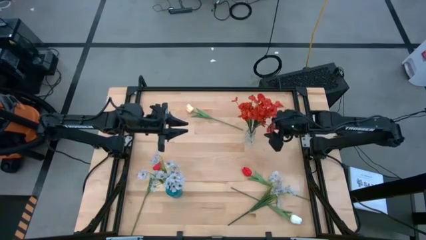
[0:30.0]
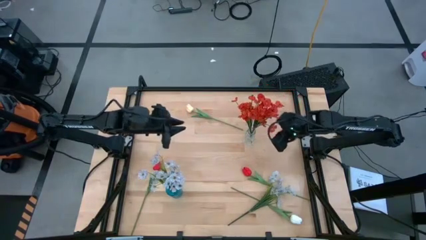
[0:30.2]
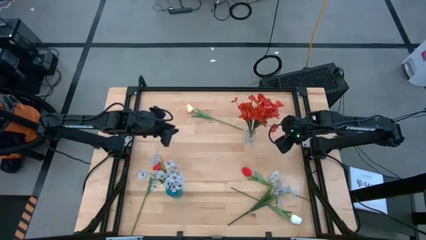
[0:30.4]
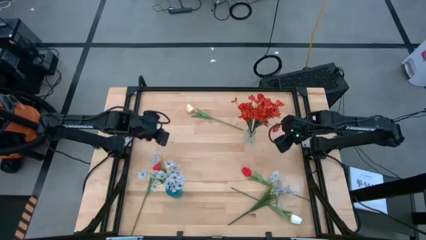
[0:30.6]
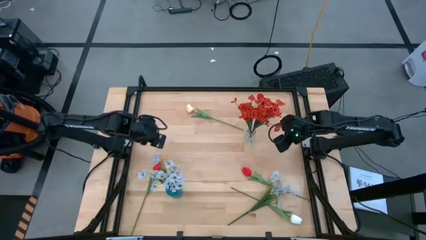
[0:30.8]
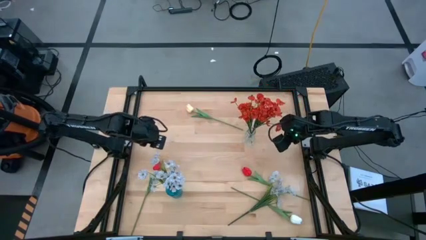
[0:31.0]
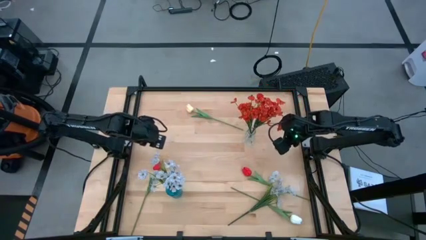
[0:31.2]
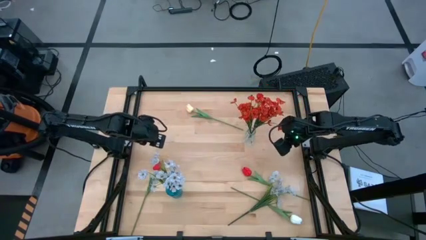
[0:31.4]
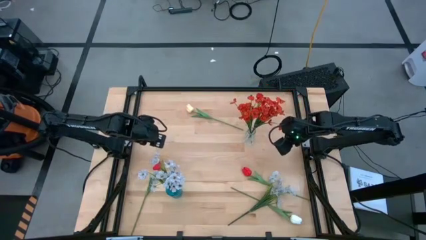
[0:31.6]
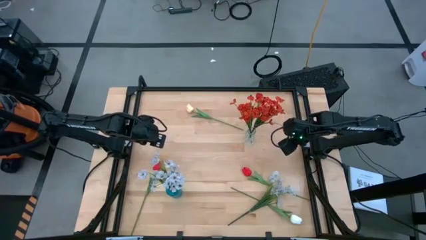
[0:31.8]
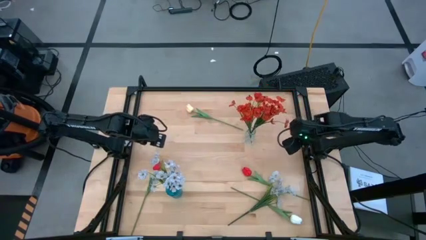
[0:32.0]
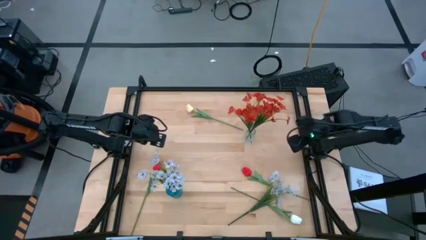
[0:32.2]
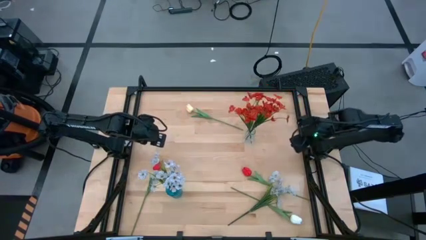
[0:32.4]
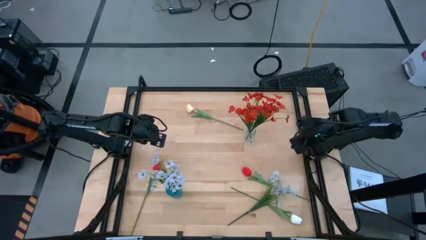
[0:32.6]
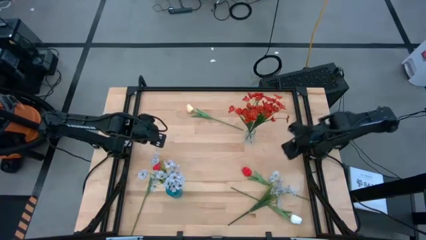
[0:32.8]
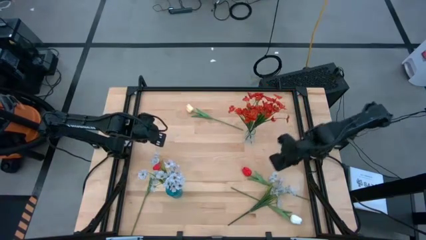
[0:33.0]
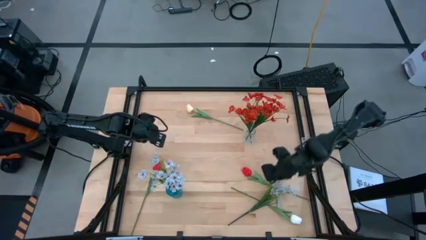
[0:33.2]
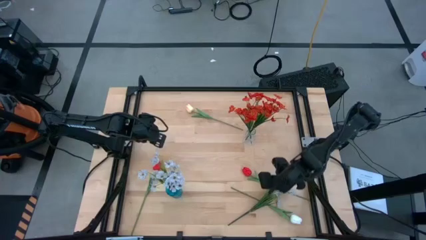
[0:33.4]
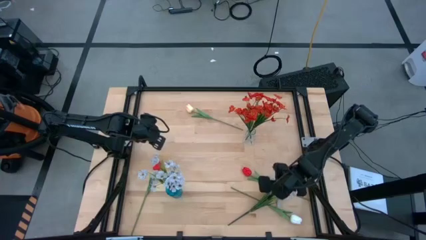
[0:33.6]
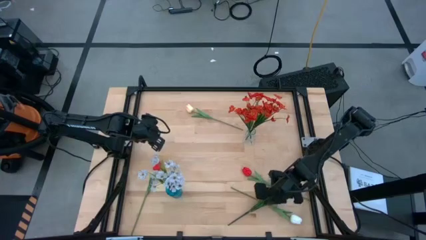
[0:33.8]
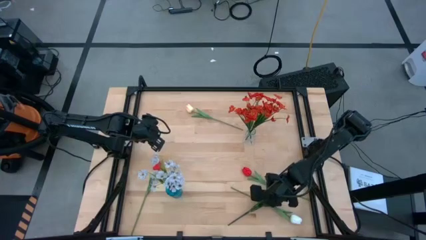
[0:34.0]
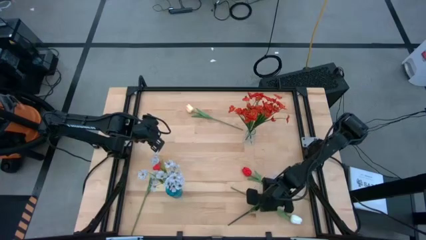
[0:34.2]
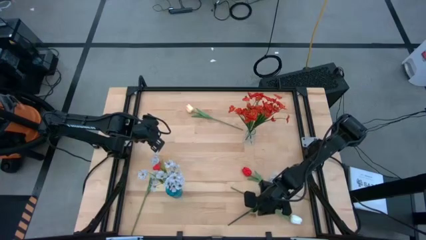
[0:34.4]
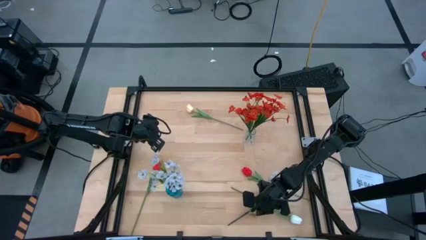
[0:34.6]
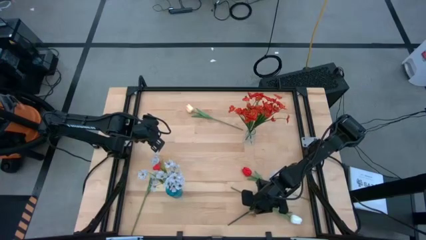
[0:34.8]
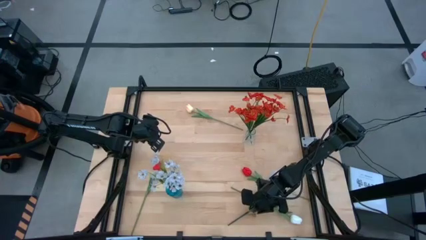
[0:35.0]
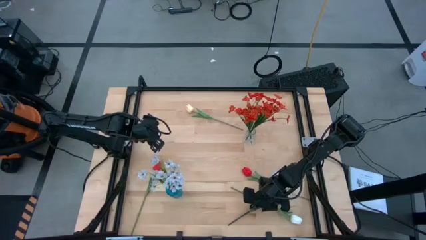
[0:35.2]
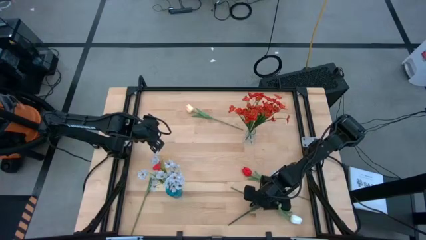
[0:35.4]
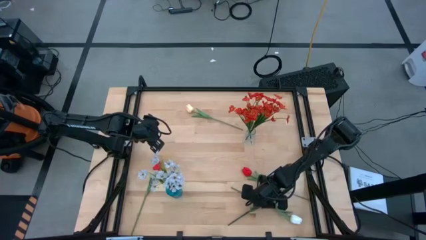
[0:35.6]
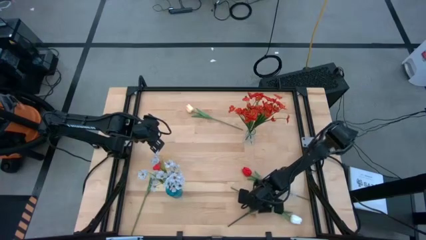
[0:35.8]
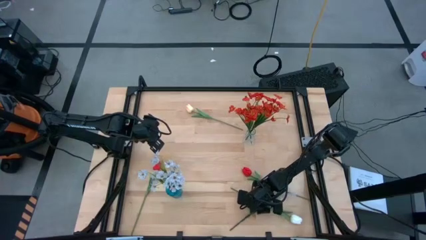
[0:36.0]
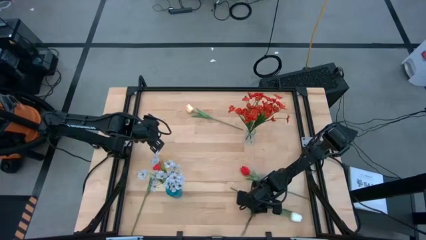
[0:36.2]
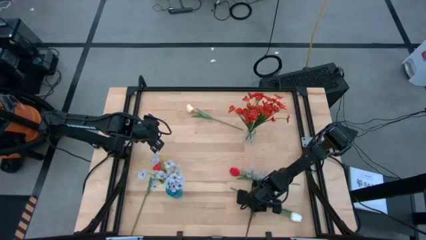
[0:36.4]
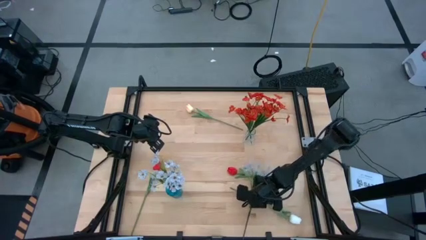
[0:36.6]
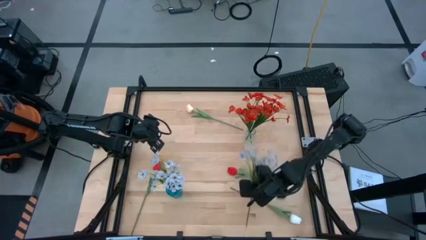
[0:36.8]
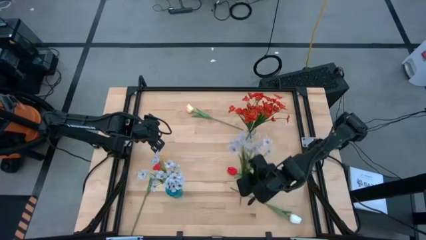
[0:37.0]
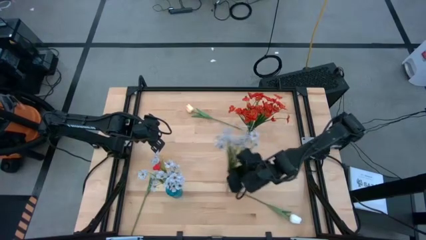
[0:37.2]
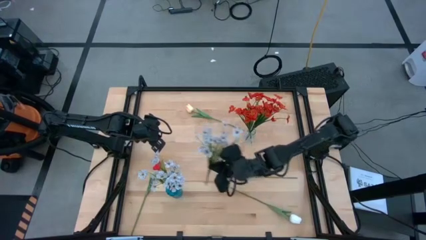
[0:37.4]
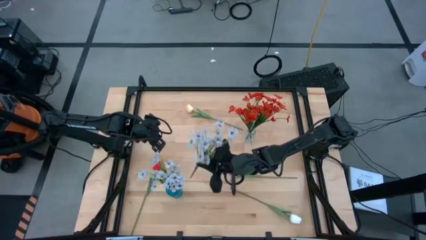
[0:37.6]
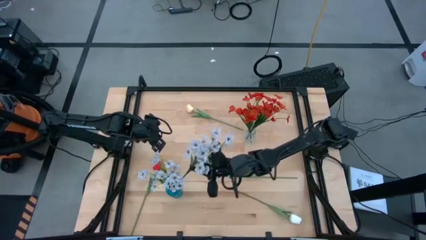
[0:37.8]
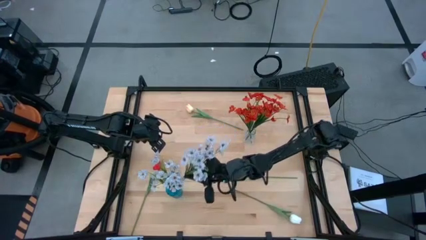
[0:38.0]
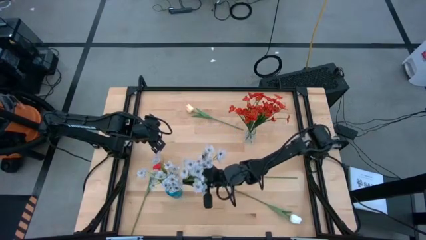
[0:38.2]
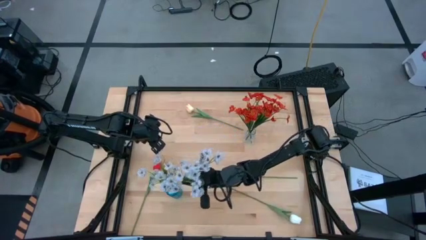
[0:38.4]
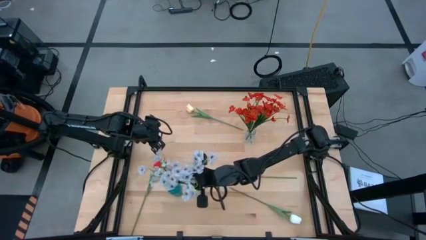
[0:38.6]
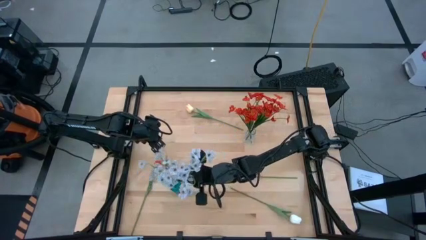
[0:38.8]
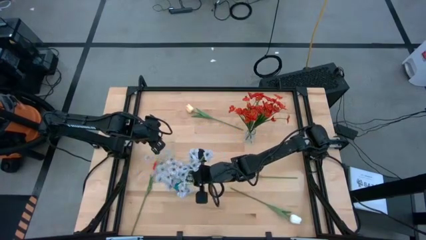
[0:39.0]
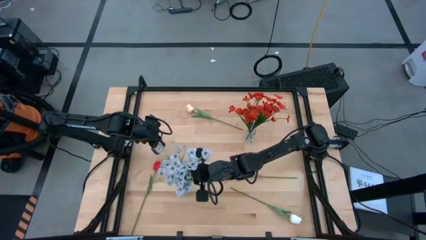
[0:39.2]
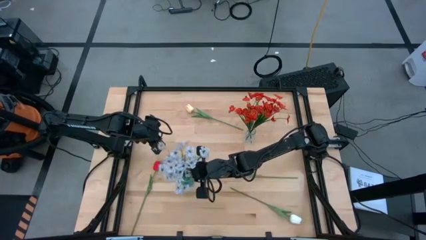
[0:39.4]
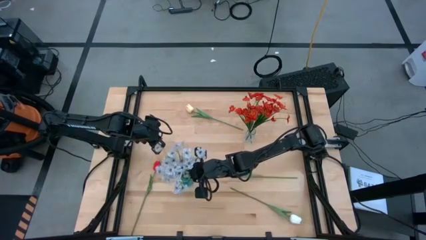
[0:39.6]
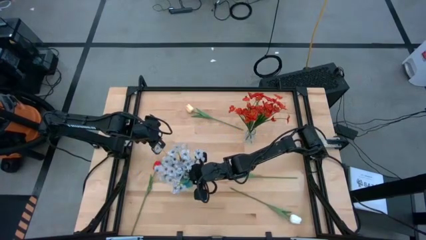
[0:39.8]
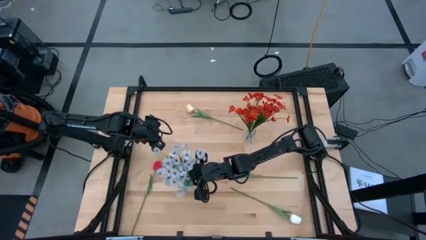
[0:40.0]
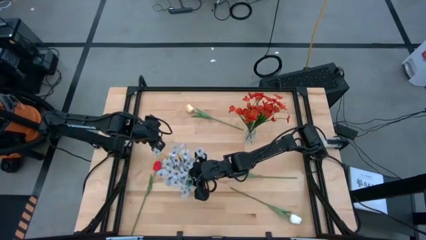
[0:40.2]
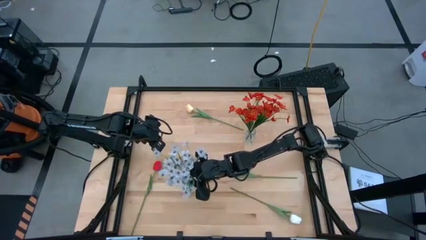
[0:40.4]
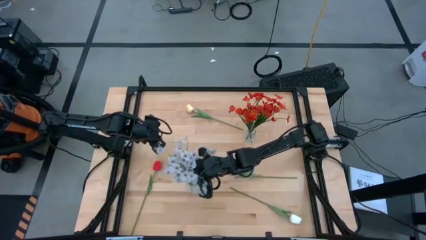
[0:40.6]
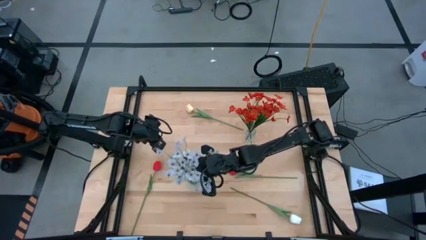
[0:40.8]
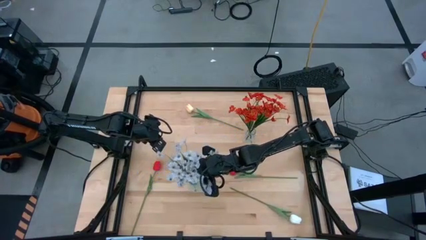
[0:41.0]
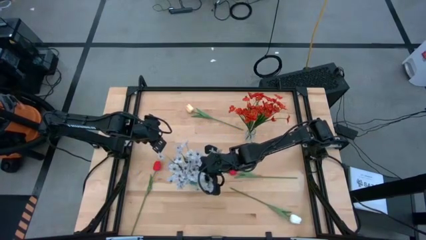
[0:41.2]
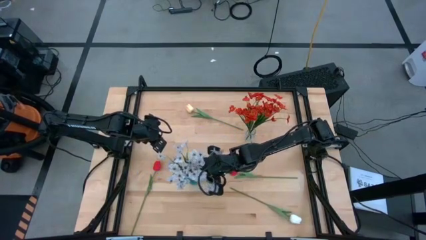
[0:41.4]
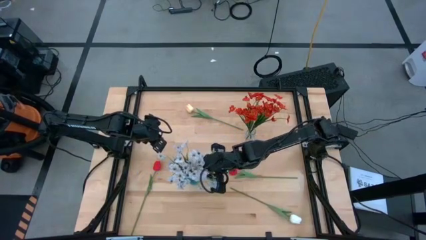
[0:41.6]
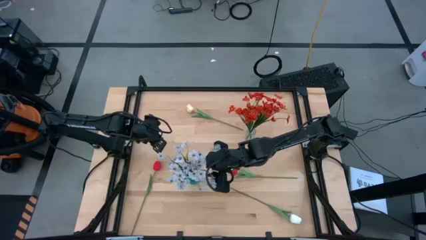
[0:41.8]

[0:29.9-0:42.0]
Task: Sort flowers into vase by color
Put the white flowers into the blue vase

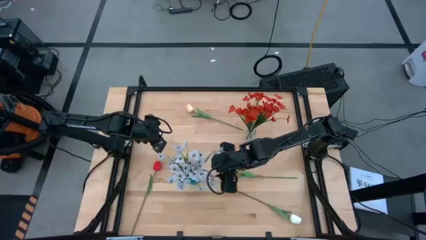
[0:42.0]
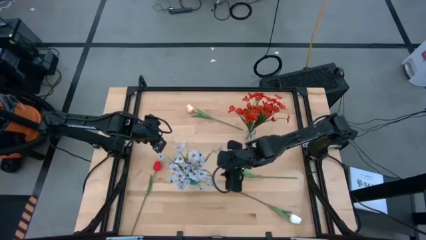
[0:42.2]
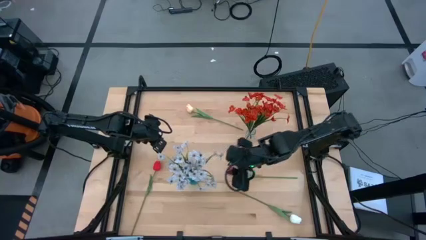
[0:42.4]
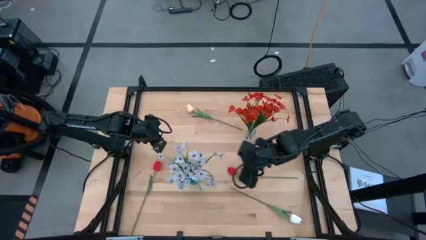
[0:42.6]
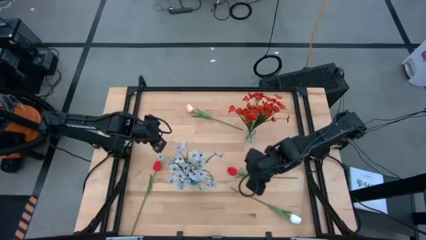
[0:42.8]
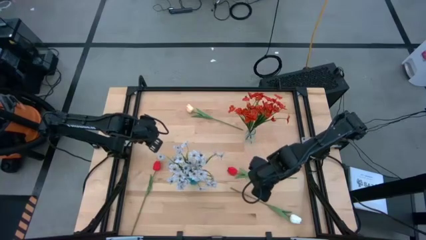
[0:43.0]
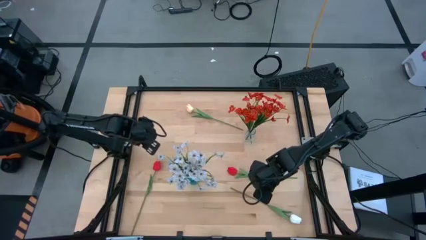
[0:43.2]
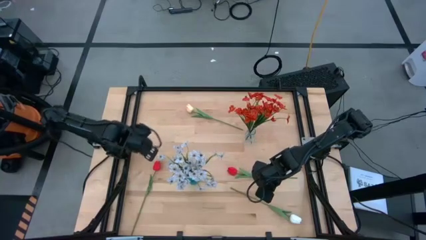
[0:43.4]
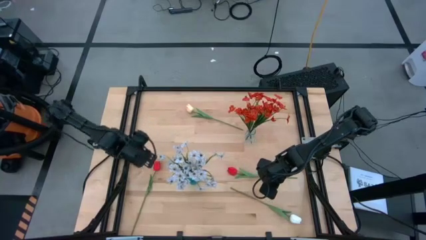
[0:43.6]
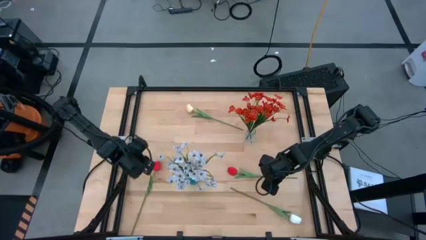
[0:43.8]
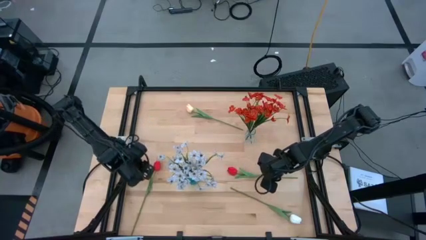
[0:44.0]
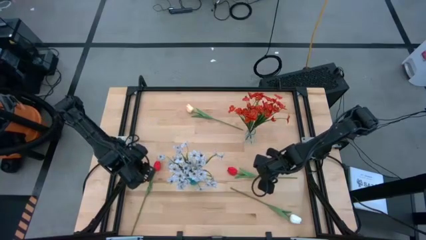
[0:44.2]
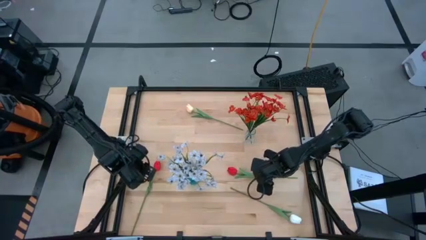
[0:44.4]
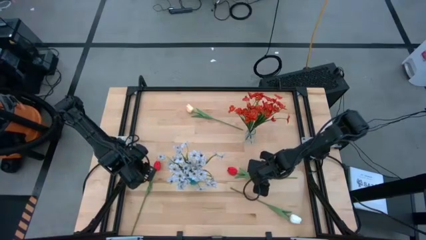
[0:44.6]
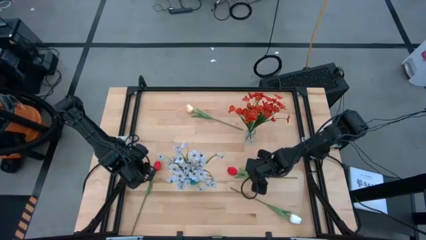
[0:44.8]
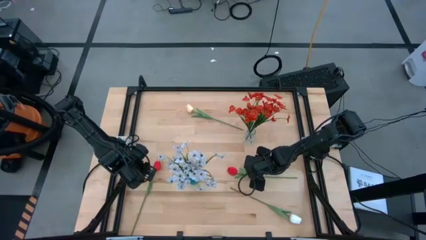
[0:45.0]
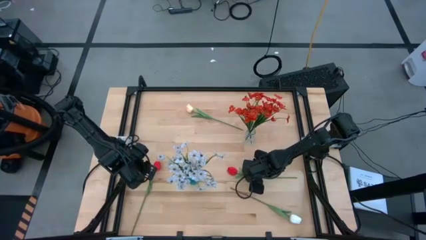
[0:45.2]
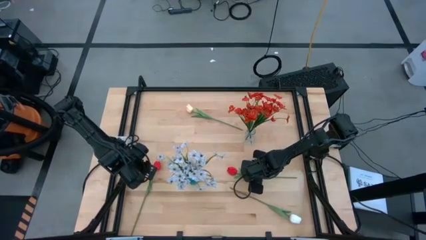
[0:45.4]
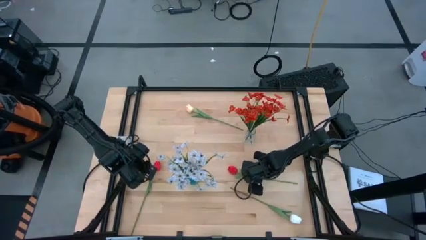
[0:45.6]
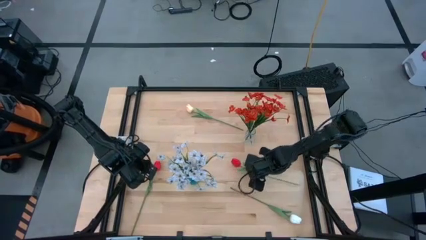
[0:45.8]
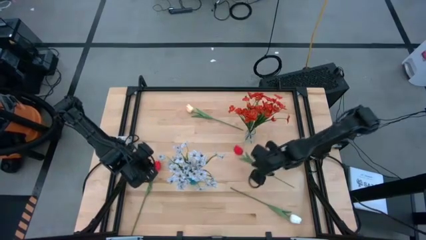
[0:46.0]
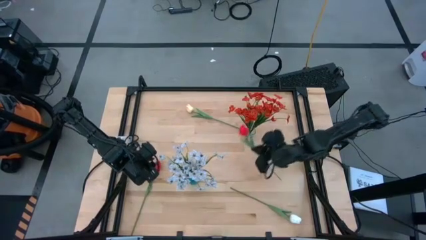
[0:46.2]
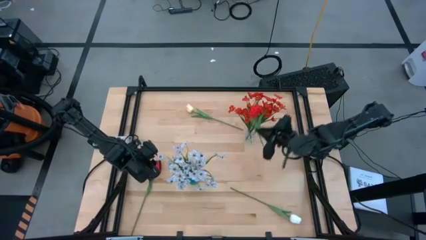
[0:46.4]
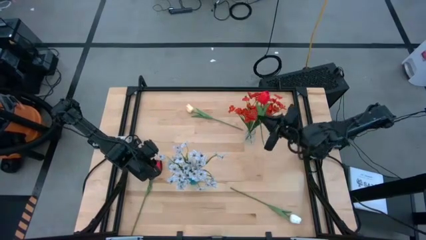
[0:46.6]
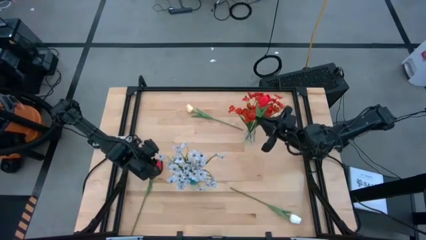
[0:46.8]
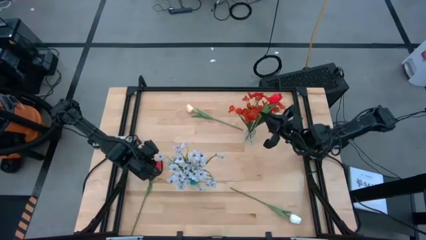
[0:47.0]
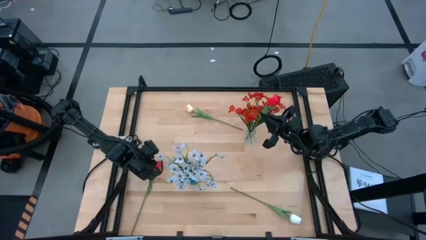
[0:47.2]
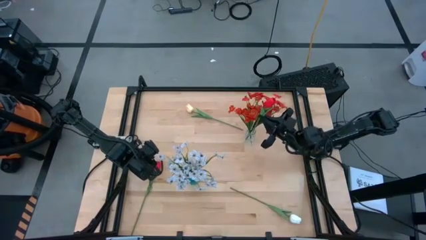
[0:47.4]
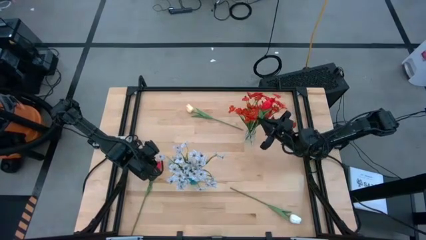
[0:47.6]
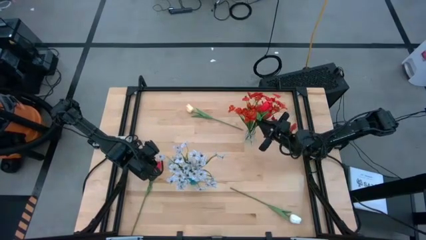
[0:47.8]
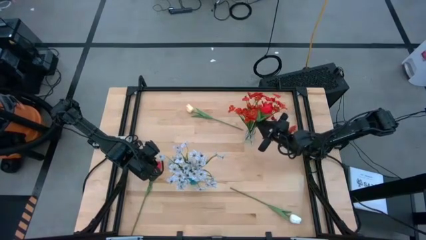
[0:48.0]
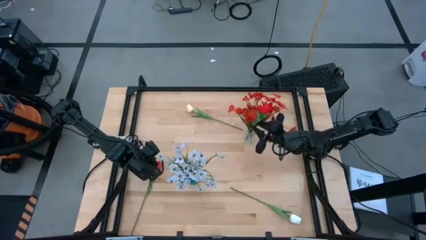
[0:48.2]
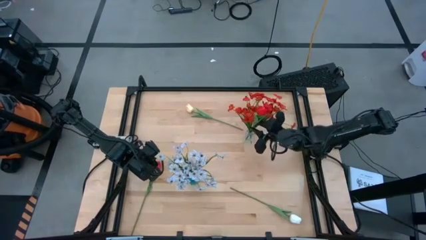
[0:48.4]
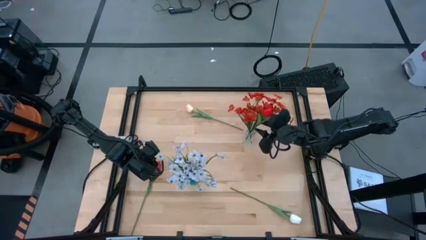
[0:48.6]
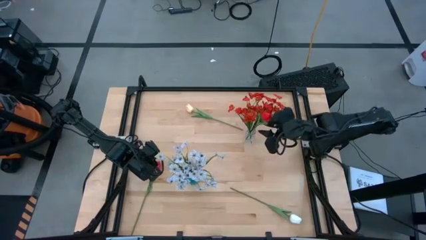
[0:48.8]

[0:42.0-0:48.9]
Put the right red flower into the transparent flower vase
